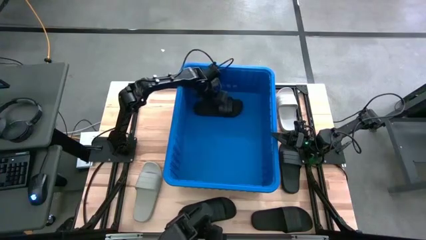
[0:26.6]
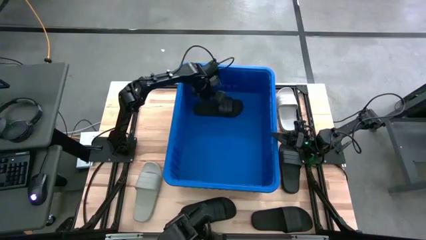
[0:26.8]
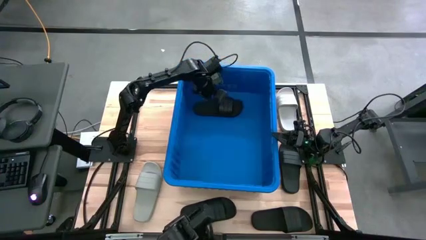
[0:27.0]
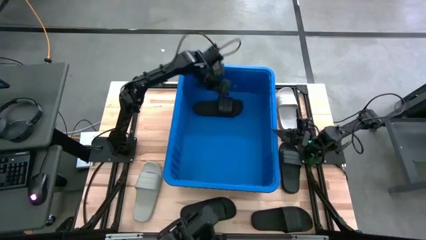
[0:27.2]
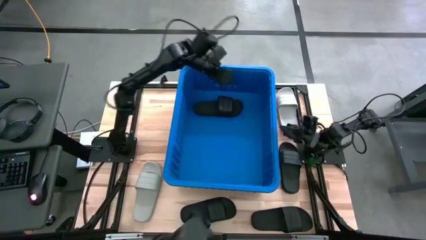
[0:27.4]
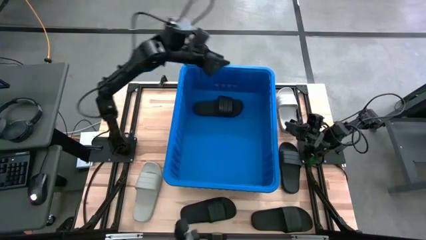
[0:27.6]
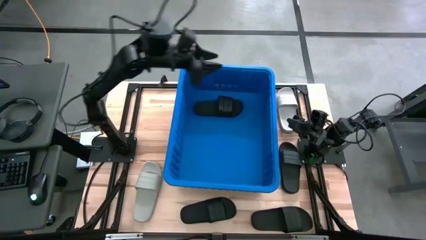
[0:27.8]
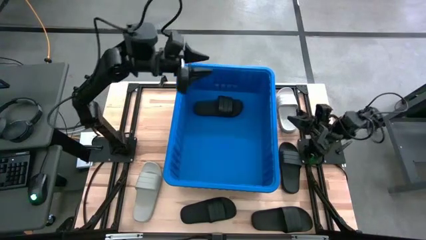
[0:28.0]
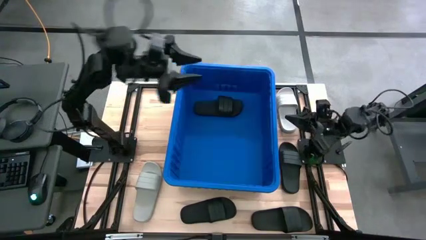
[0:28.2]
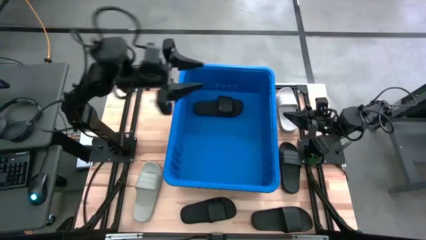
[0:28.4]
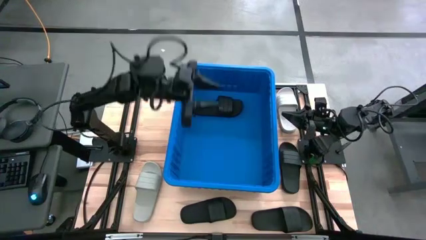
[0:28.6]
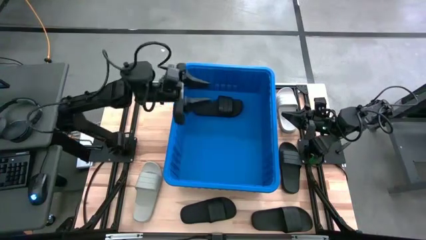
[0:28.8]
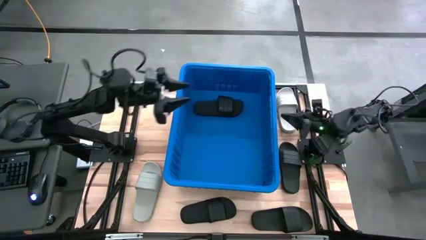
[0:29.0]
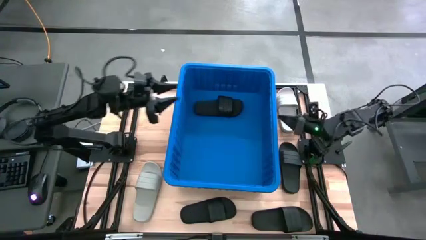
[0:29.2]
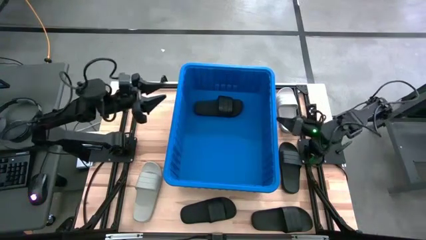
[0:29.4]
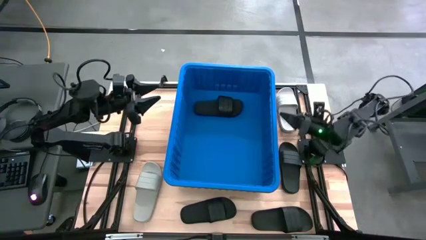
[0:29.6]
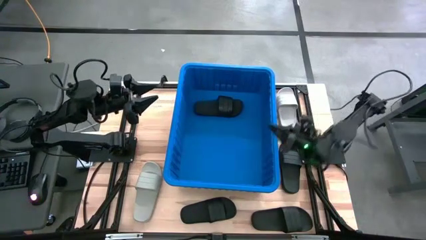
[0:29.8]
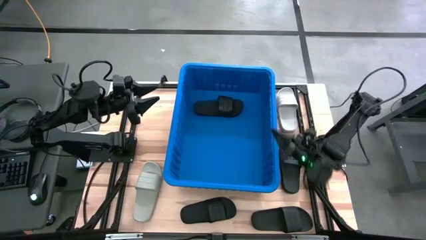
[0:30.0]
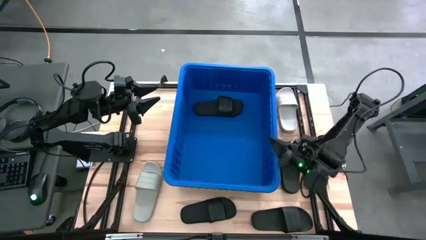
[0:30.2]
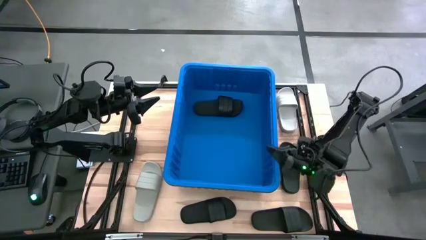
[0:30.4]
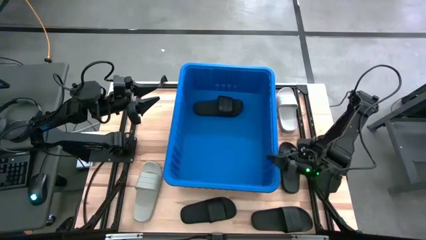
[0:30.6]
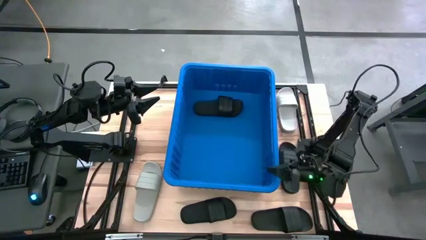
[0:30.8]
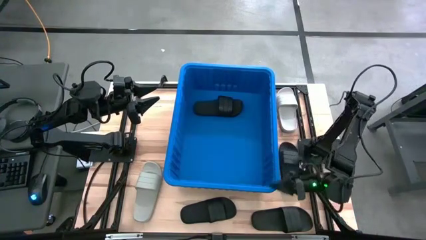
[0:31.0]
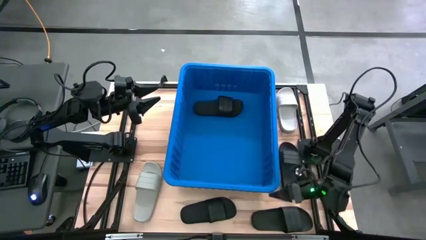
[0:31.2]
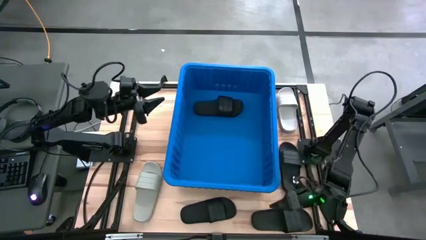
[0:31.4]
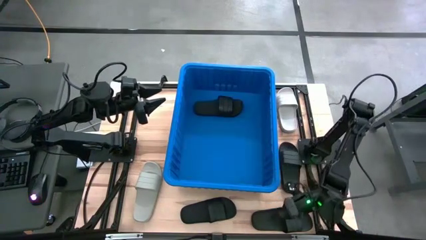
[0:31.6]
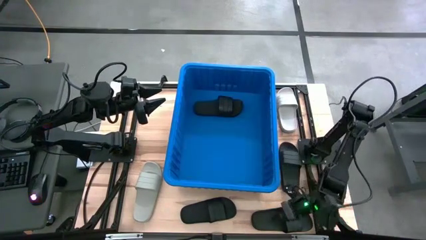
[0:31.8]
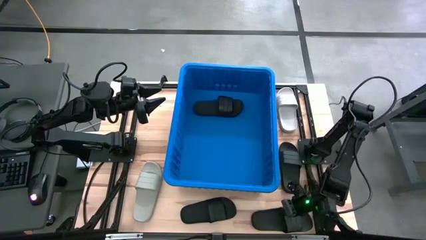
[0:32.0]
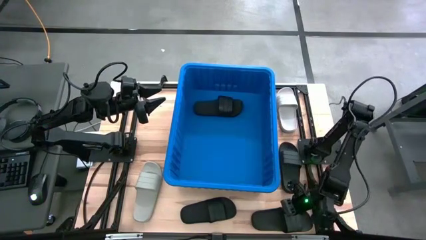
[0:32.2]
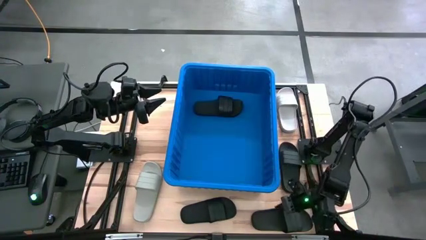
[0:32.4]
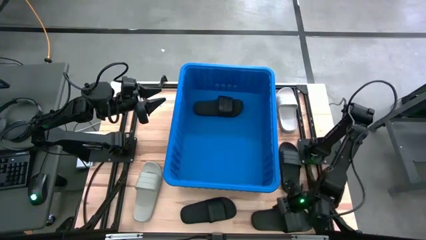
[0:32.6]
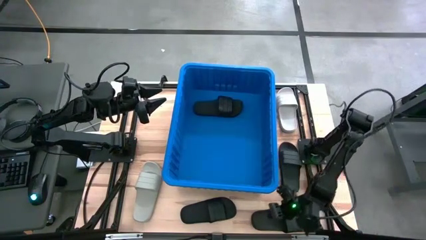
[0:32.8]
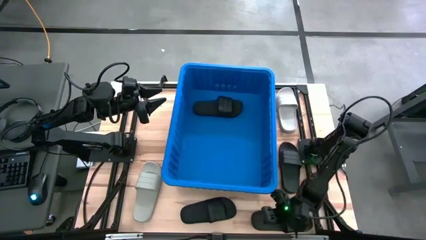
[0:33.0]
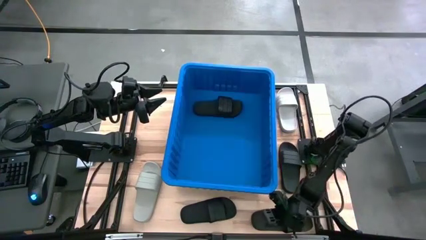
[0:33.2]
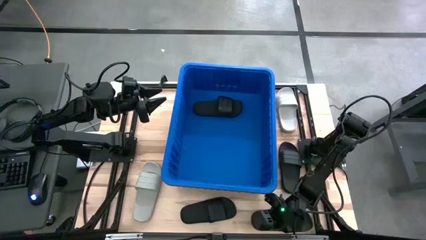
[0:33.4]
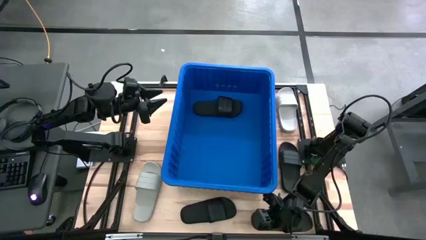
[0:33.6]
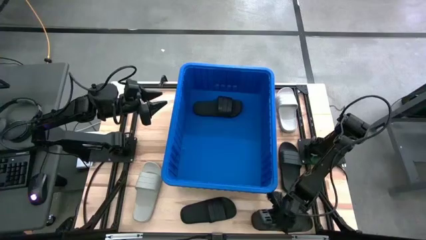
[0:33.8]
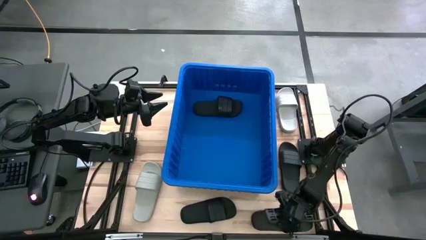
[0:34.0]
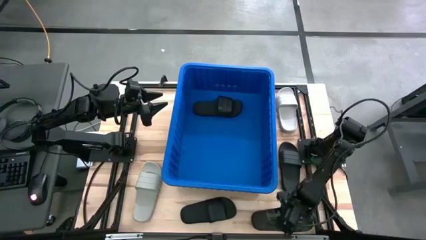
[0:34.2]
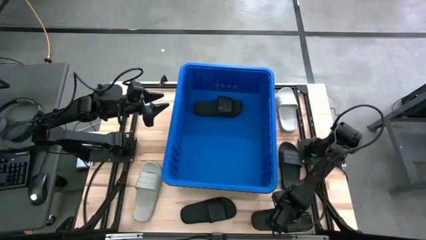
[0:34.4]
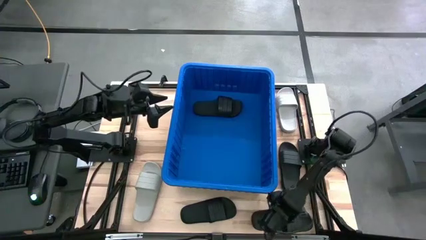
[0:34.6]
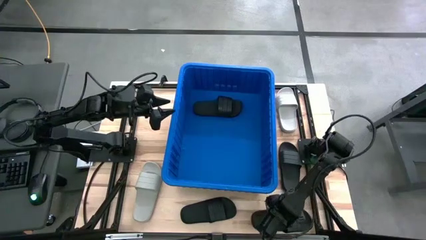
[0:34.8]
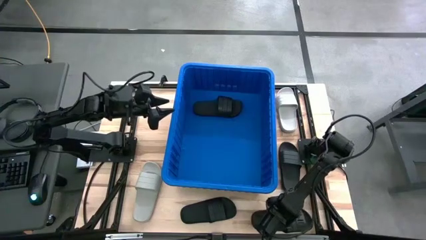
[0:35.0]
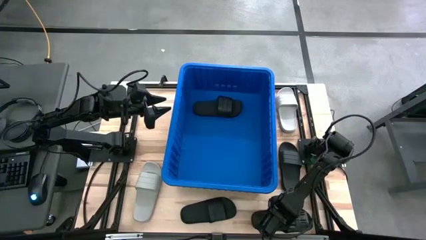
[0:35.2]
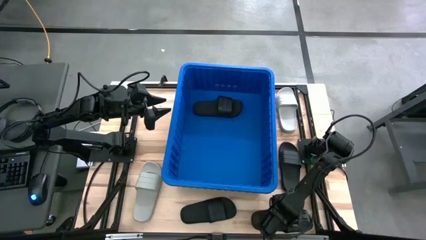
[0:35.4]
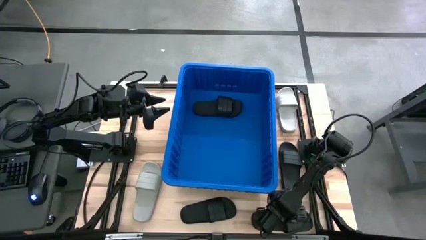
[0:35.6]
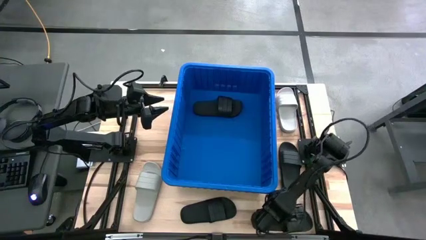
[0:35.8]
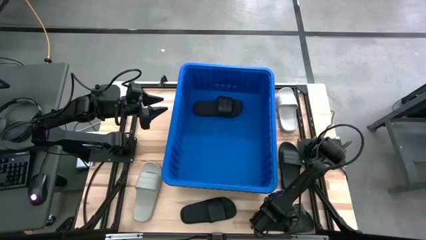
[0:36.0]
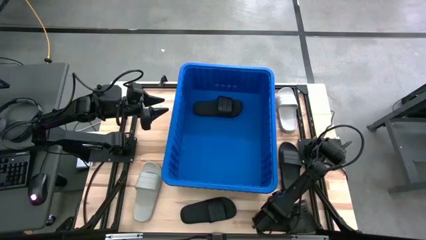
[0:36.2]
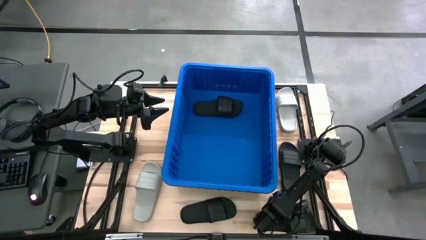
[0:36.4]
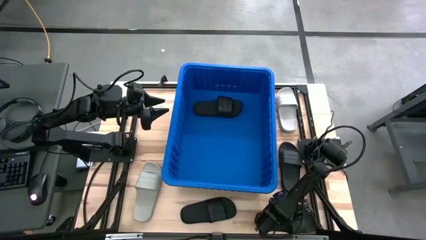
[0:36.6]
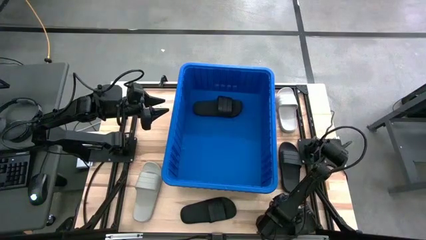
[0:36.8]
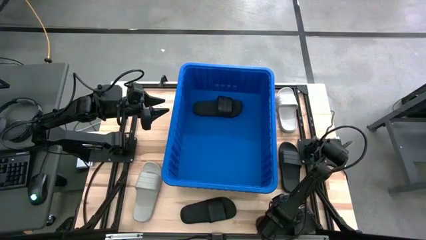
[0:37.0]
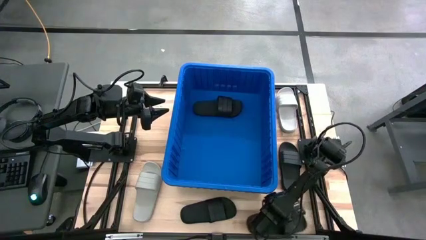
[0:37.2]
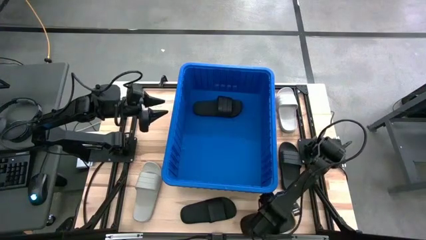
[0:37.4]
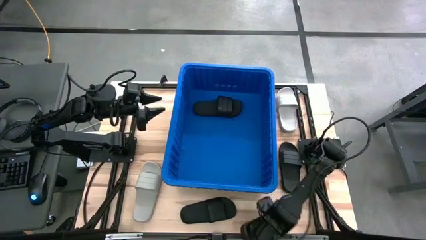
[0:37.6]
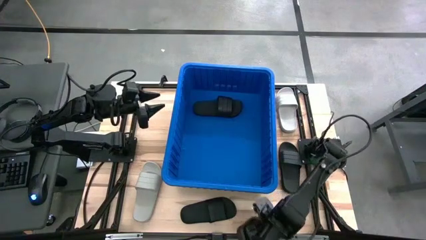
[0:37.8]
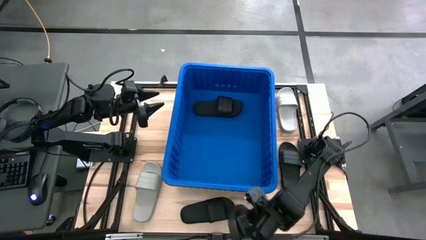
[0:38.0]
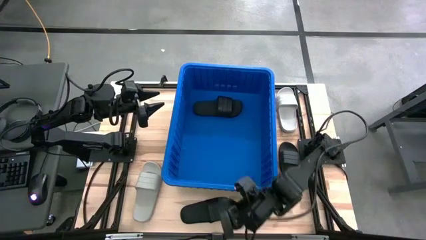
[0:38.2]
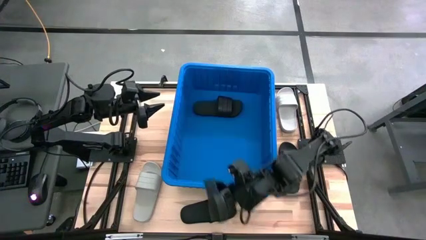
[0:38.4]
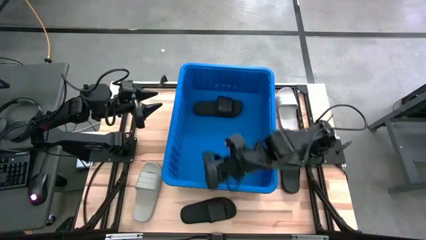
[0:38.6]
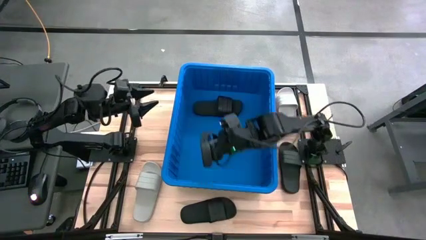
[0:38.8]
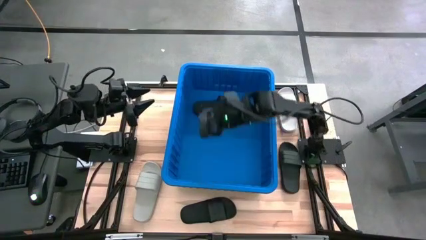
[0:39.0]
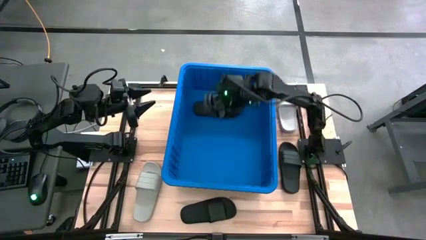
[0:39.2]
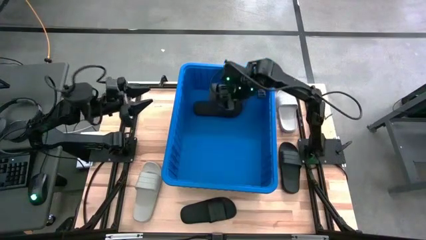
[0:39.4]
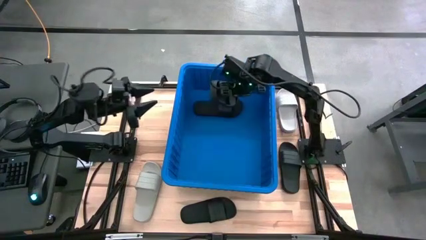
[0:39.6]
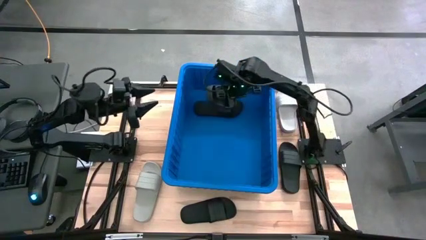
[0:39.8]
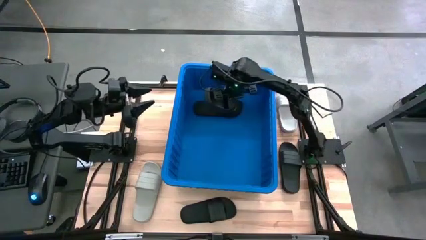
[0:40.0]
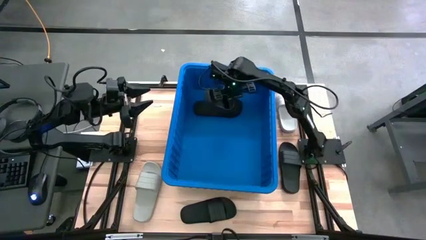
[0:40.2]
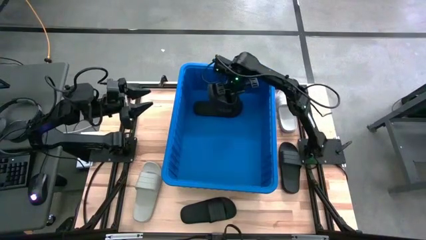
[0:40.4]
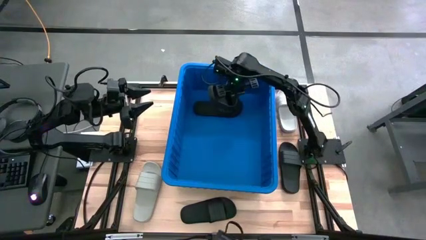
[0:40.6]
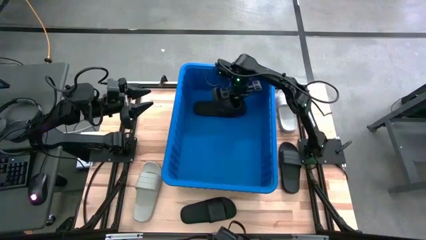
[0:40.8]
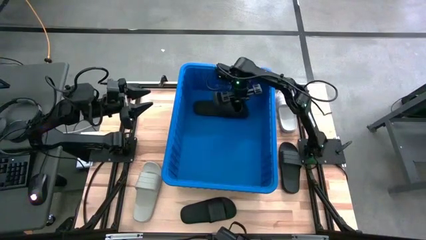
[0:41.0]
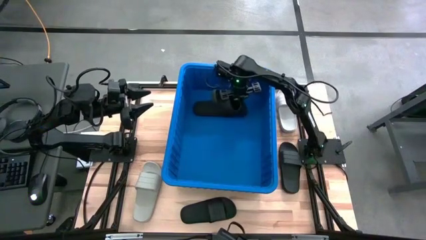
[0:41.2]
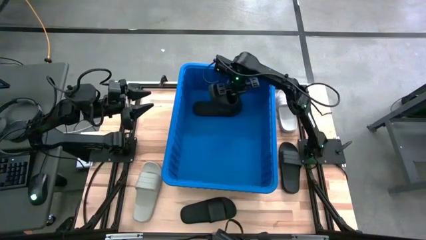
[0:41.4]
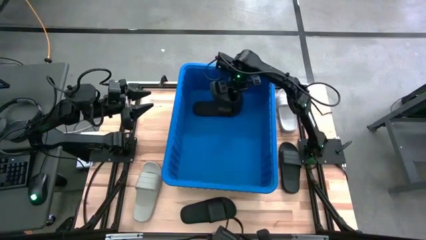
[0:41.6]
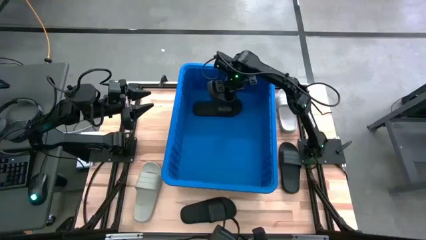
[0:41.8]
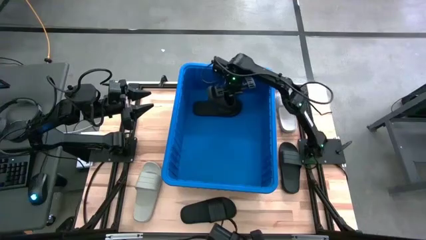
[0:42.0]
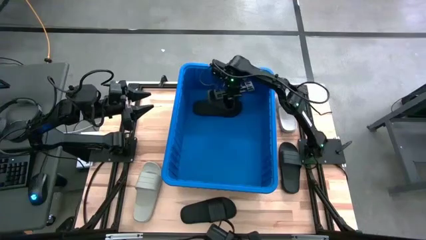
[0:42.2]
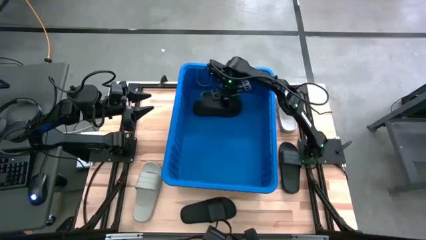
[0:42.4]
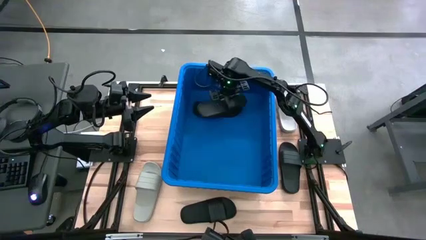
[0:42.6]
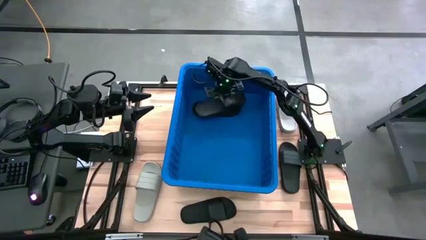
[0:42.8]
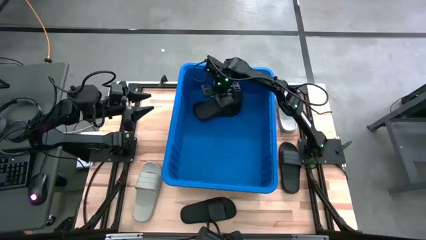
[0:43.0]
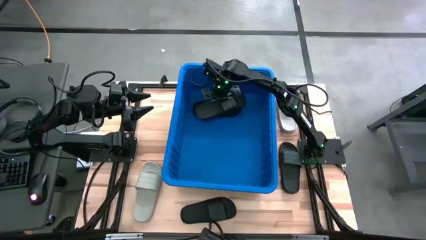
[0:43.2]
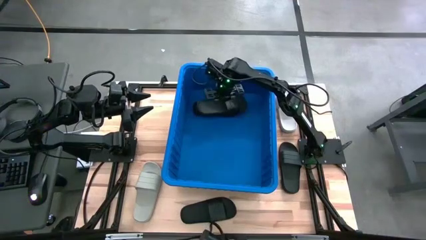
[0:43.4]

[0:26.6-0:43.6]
Task: Pick and place slides into bin
Put the black slide into the blue container
